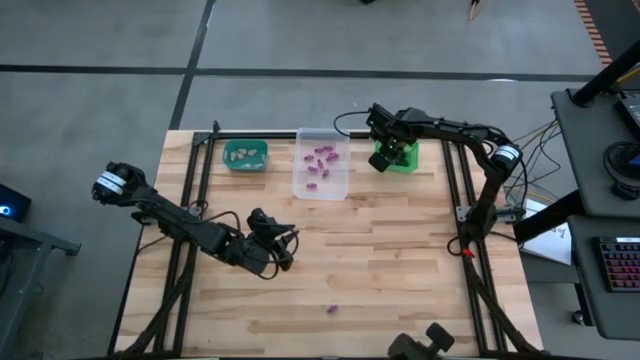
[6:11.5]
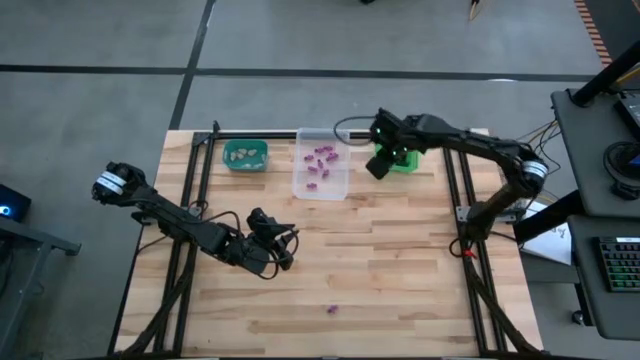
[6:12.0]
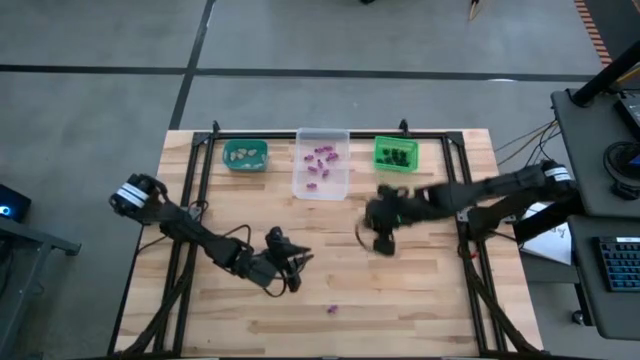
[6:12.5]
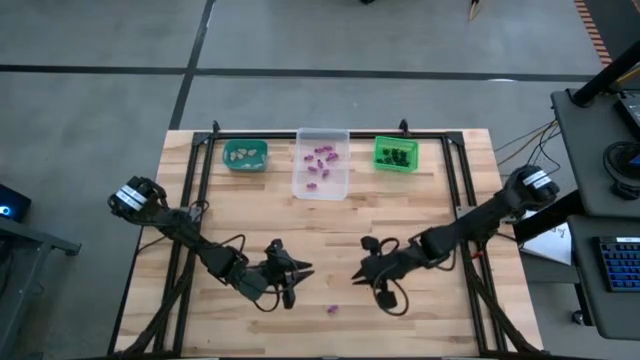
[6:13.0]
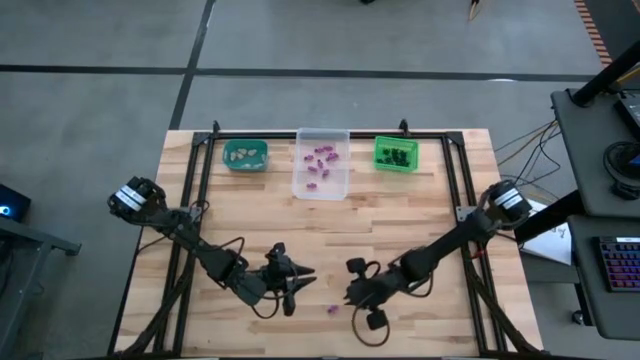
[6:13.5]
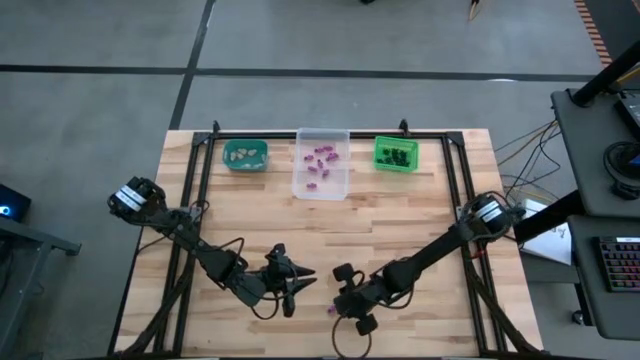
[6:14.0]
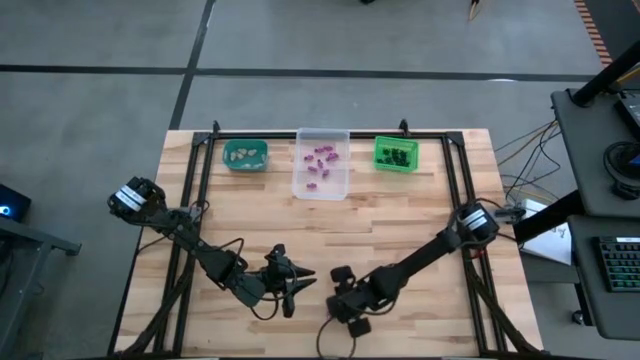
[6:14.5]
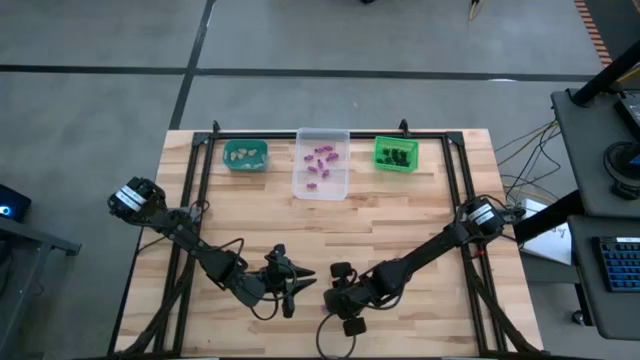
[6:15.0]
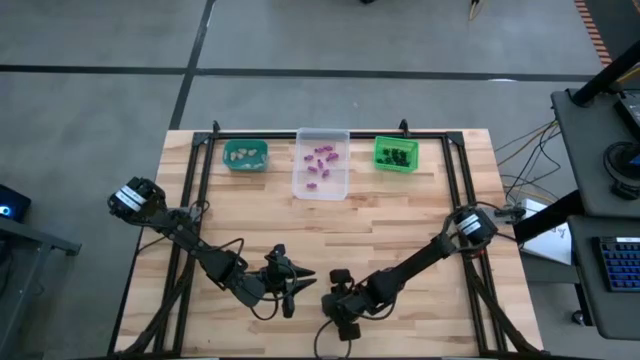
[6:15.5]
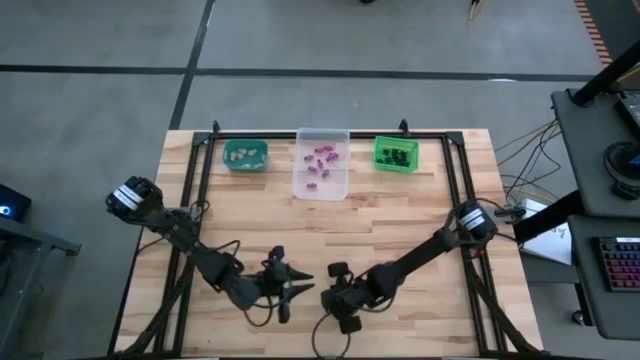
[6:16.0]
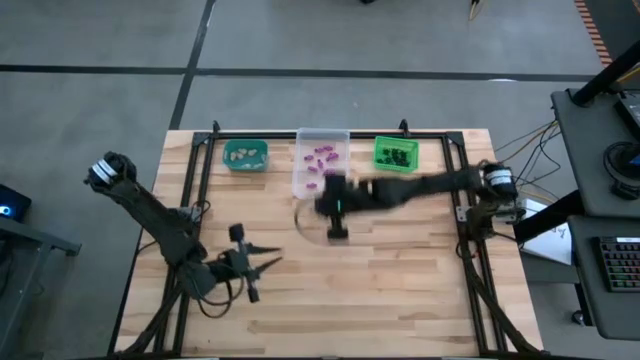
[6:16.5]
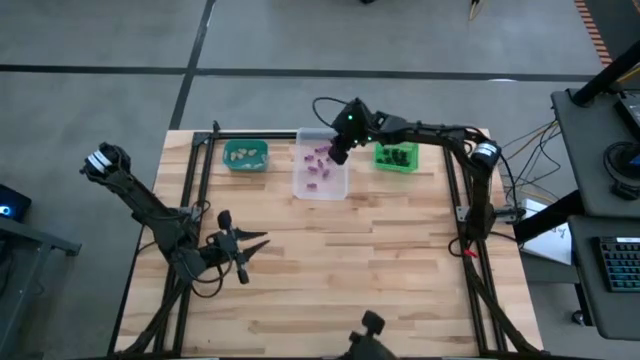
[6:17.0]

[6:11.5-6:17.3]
Task: Sort Halloween decoration
Put the violet skeleton toy into the transparent bin

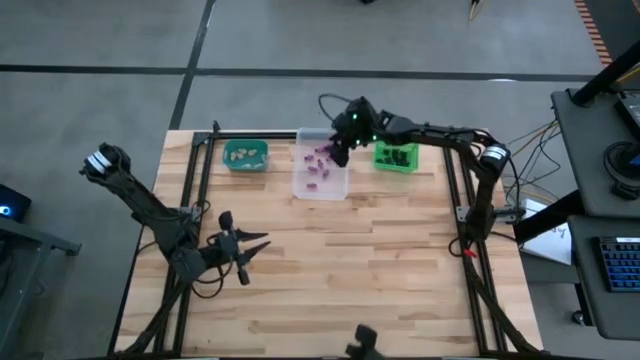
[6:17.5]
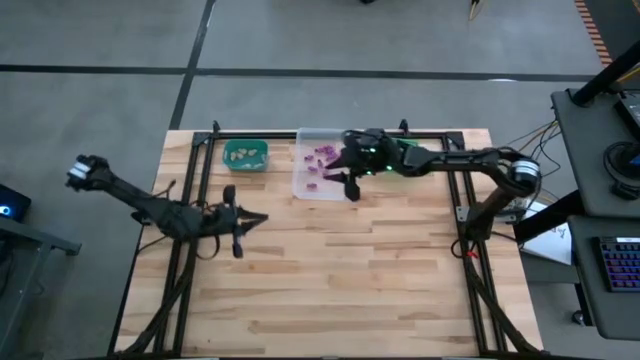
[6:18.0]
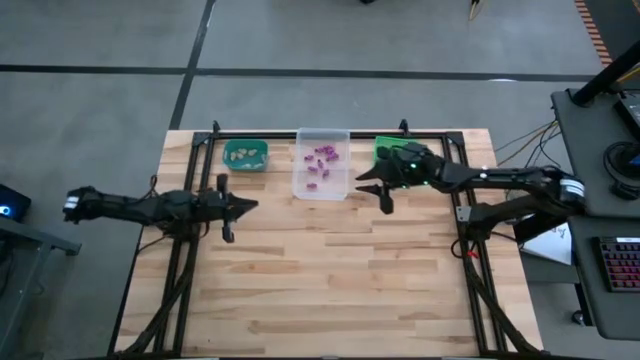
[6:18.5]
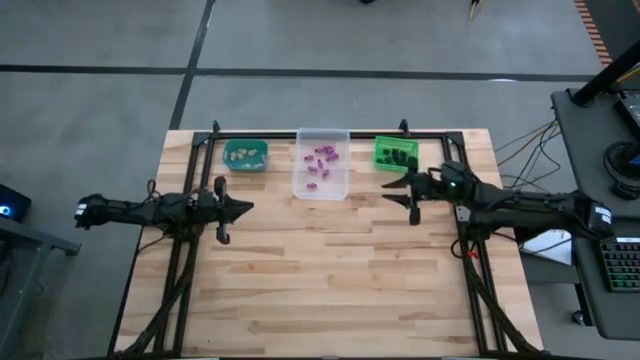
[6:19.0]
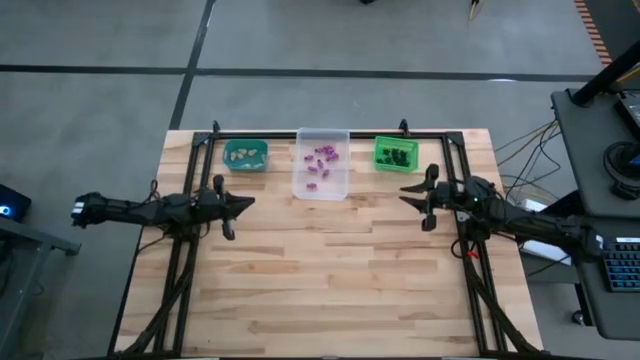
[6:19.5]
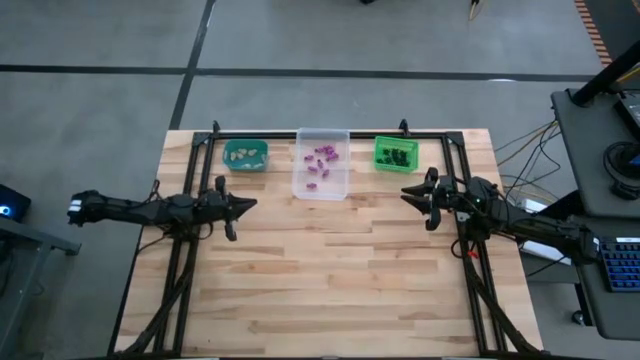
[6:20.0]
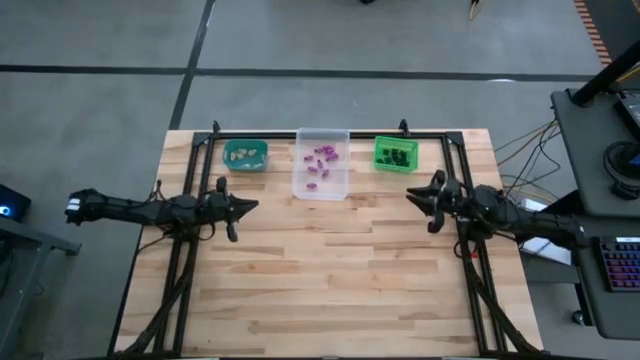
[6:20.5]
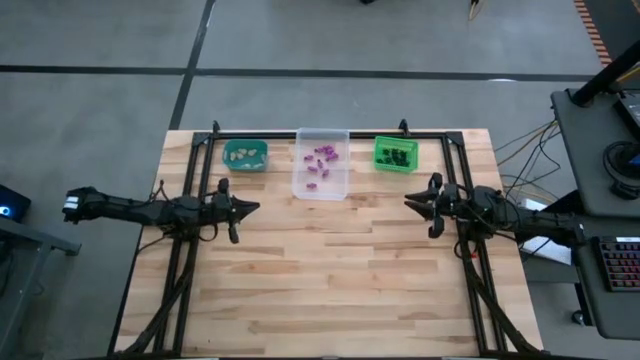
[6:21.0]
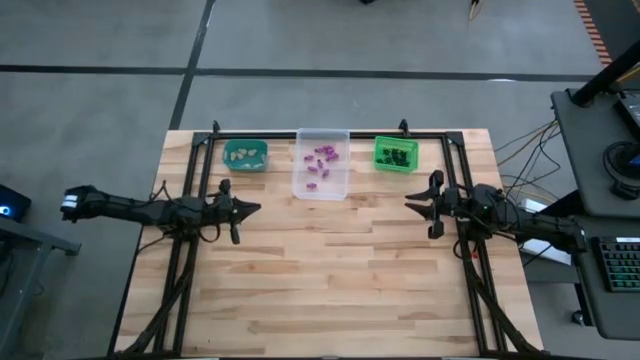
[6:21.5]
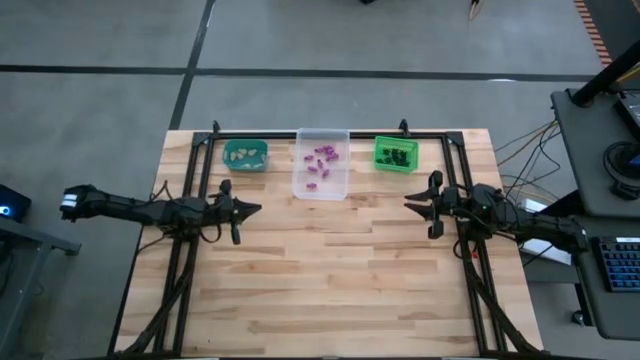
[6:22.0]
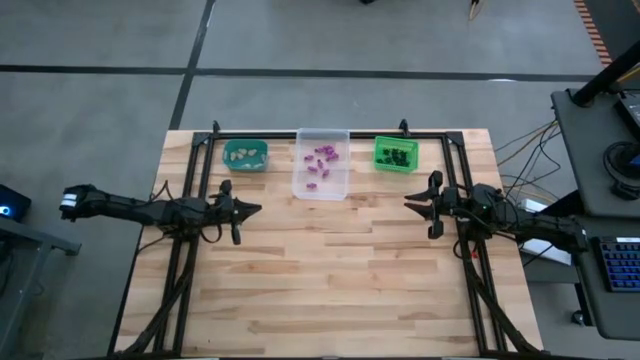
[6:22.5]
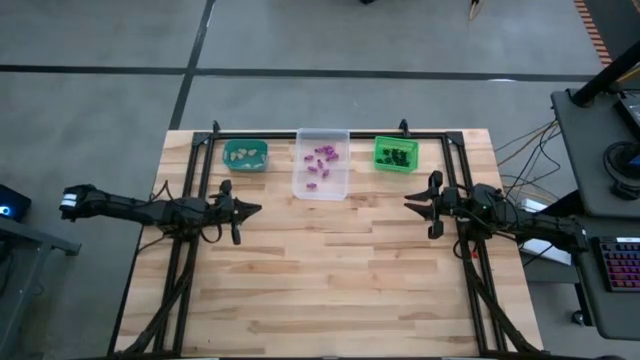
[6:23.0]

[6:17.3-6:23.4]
Return to Home Position

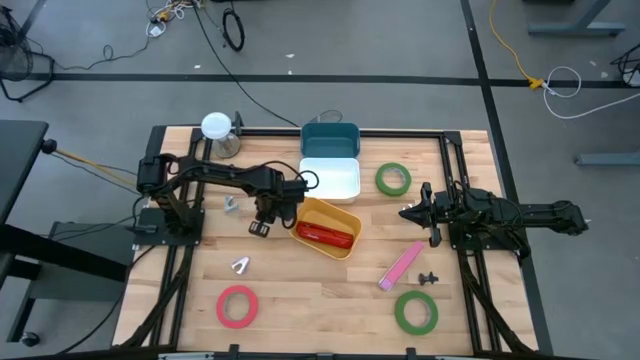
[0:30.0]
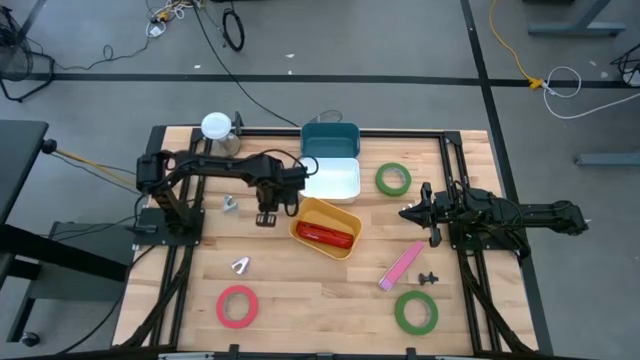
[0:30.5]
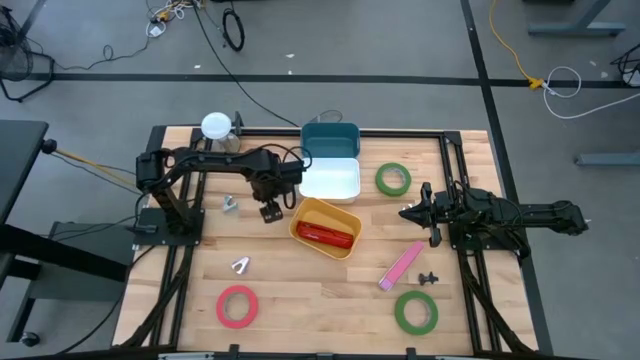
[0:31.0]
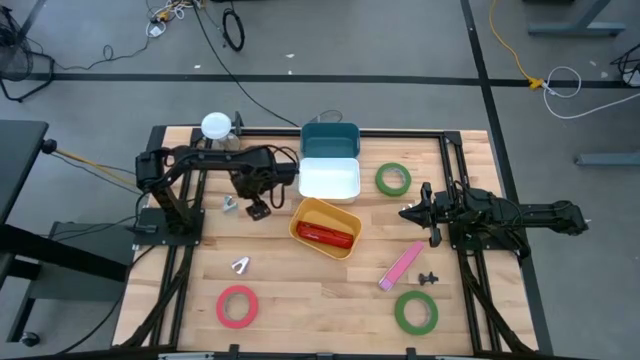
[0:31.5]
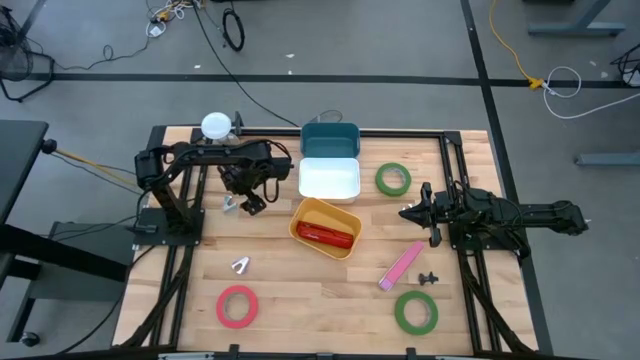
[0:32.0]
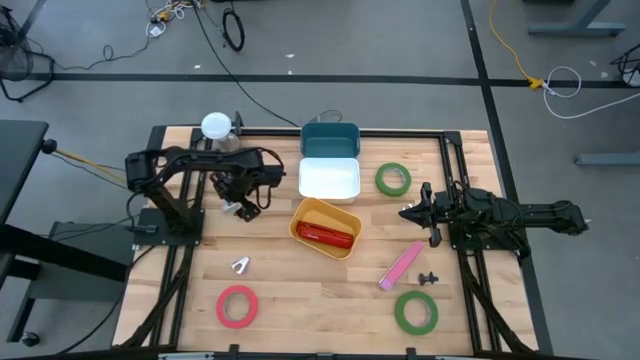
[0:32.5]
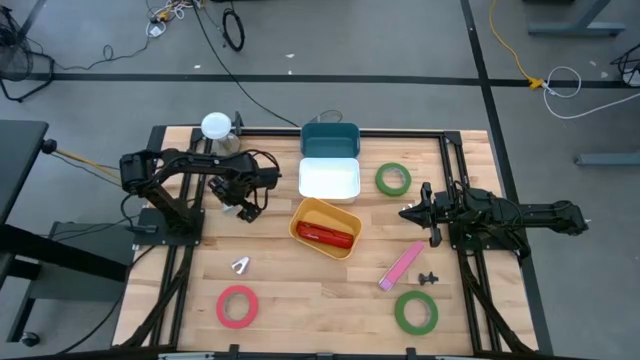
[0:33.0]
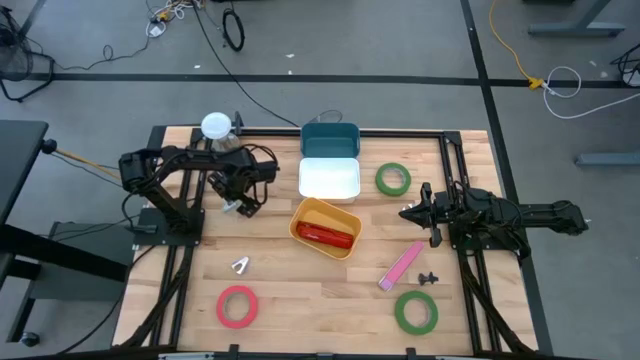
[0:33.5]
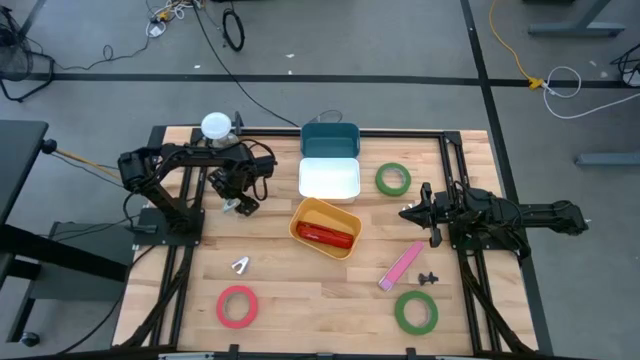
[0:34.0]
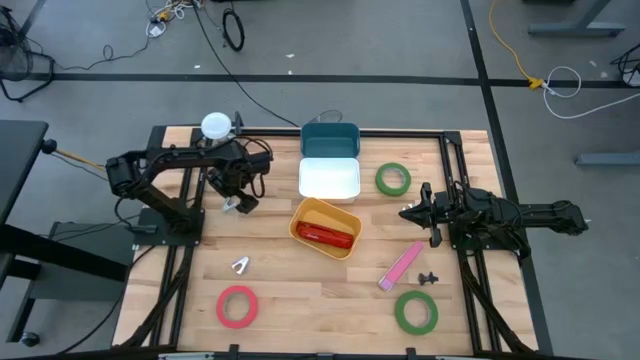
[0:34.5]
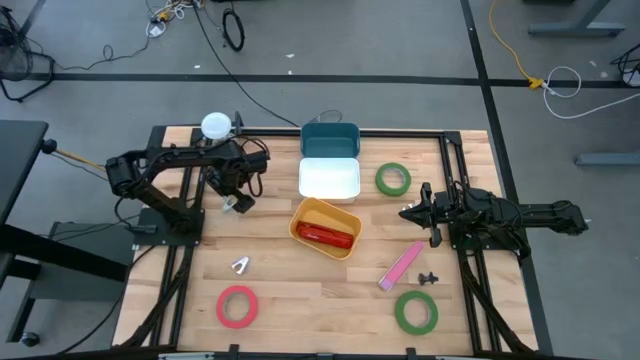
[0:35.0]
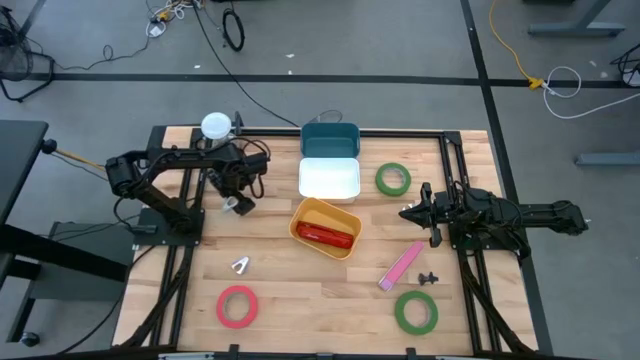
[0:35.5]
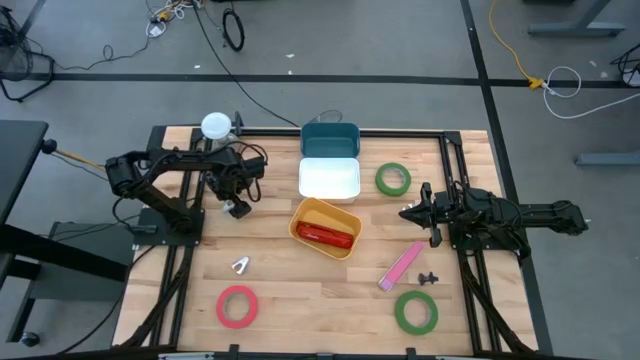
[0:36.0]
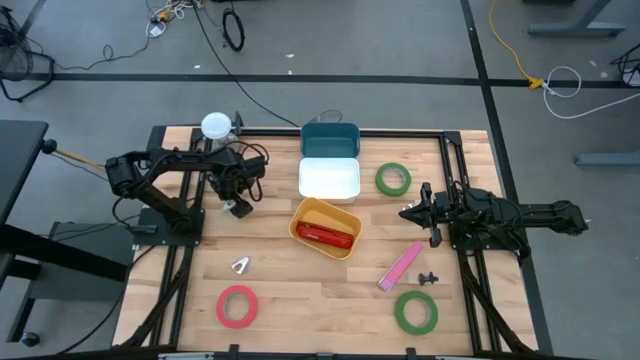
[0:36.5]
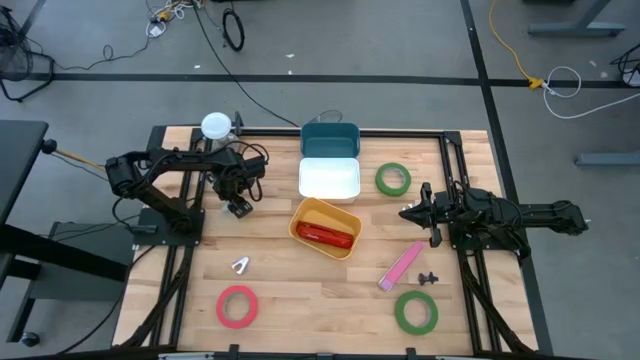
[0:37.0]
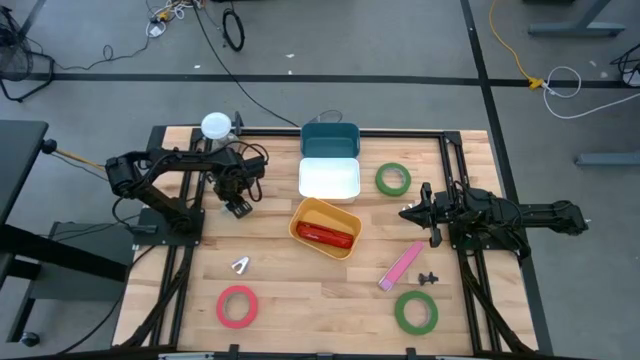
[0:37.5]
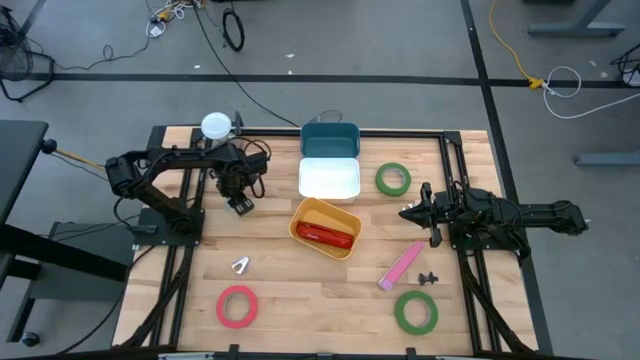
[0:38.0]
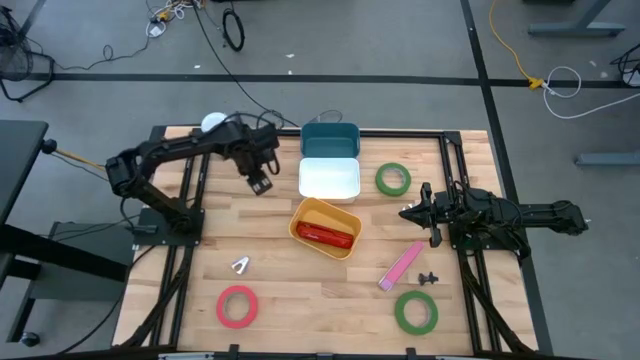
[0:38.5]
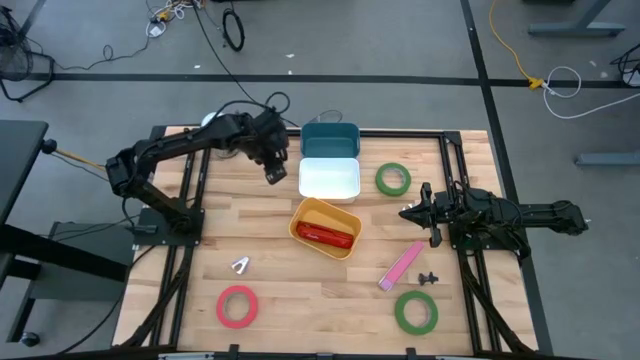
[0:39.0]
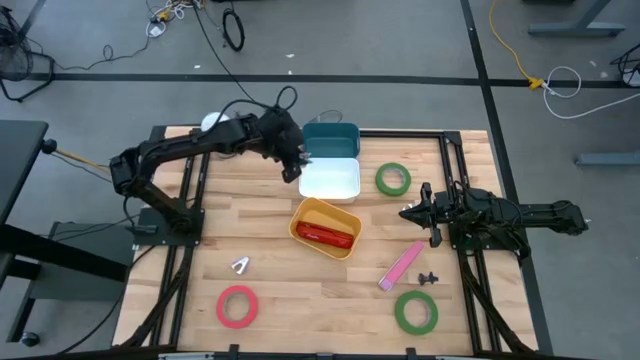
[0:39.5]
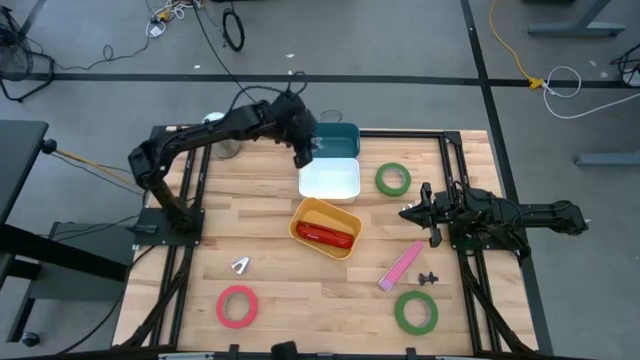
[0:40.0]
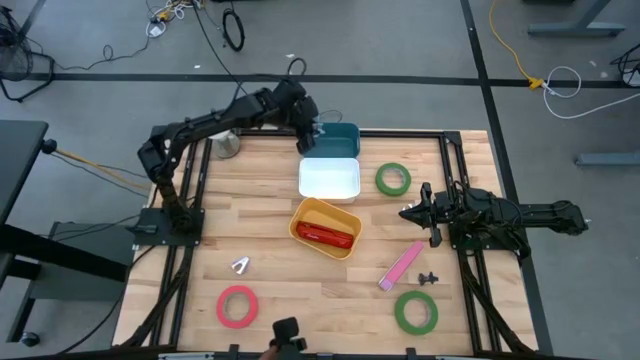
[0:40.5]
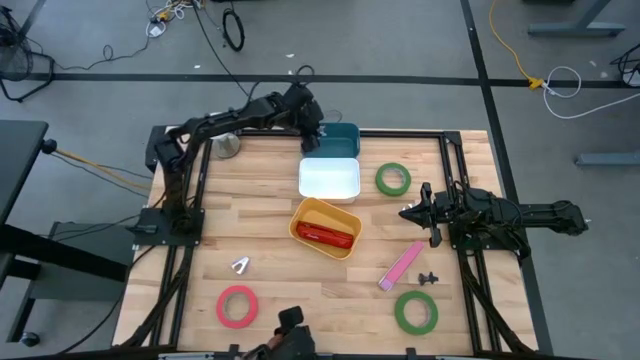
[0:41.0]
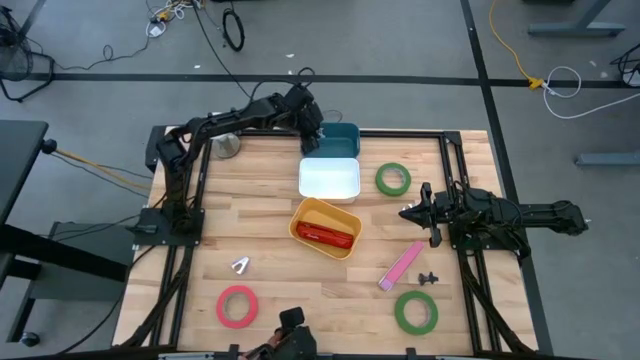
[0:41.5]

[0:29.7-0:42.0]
Task: Pick and place Stapler, Stapler remover, tape
Put the left blue stapler remover into the blue bin
